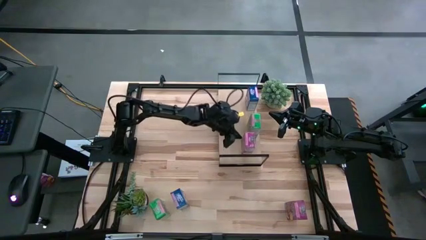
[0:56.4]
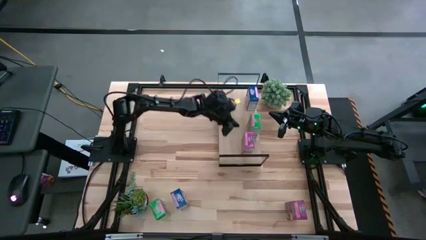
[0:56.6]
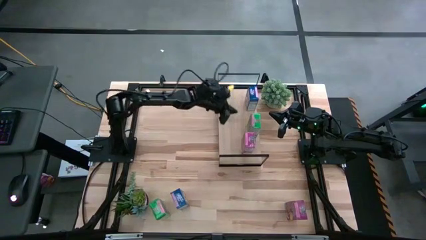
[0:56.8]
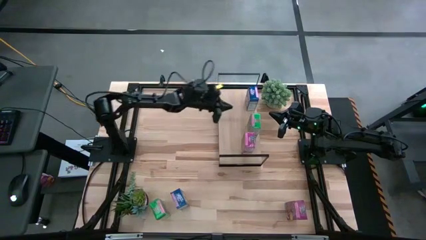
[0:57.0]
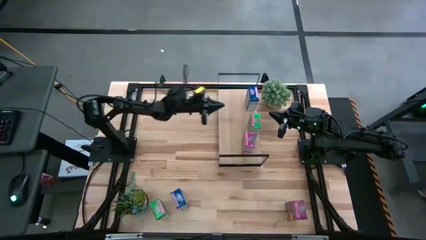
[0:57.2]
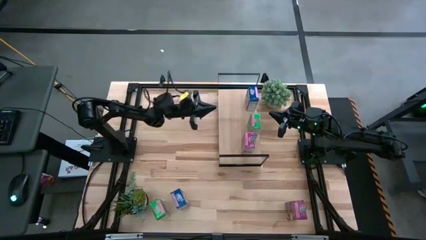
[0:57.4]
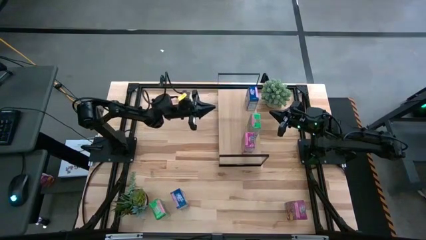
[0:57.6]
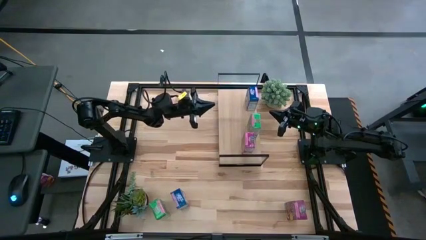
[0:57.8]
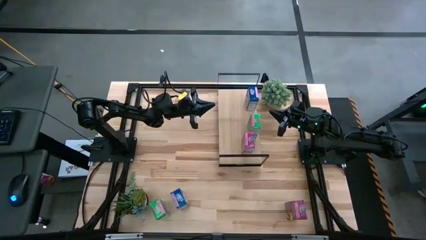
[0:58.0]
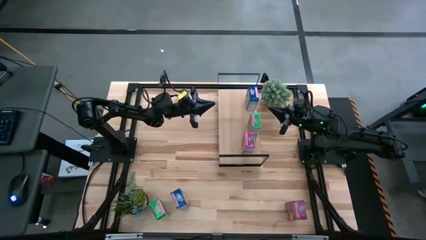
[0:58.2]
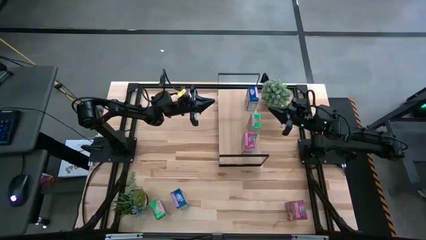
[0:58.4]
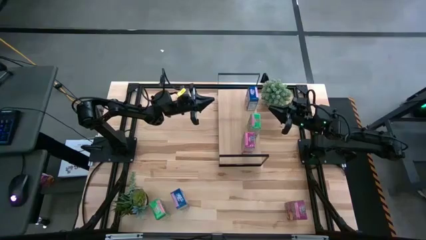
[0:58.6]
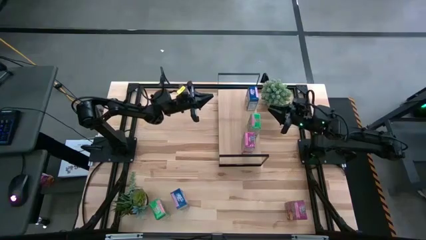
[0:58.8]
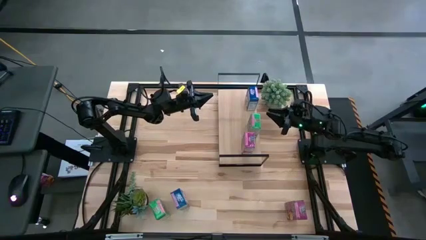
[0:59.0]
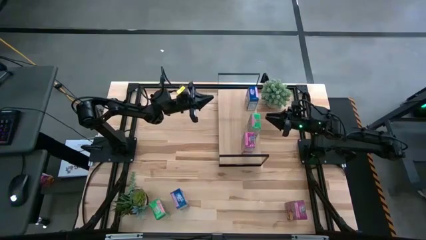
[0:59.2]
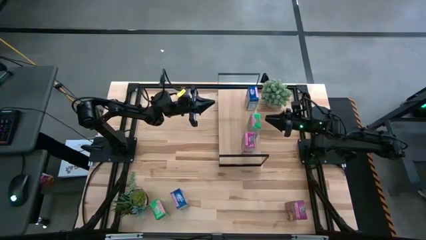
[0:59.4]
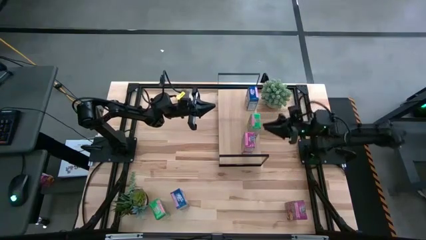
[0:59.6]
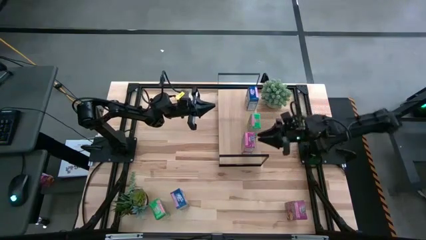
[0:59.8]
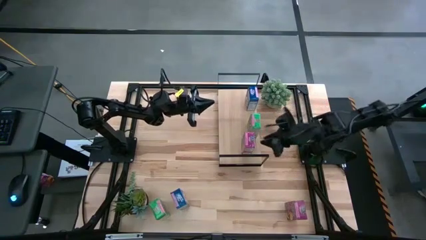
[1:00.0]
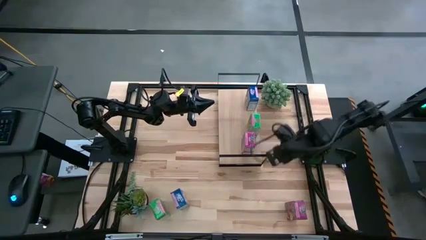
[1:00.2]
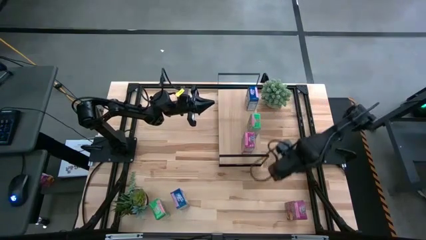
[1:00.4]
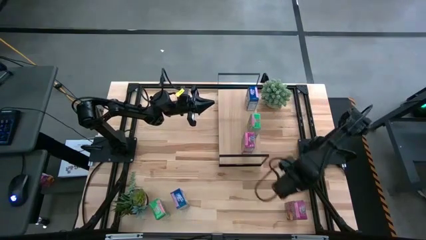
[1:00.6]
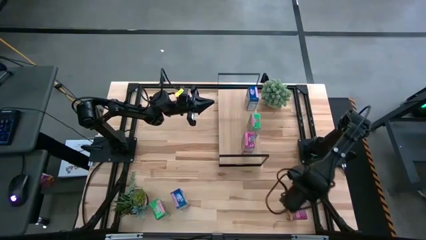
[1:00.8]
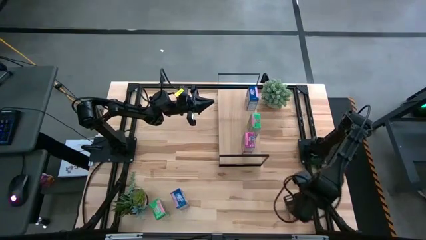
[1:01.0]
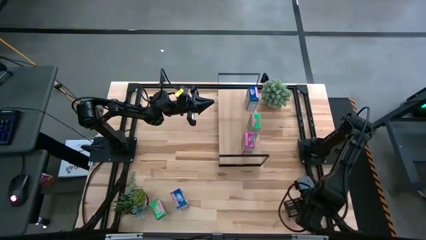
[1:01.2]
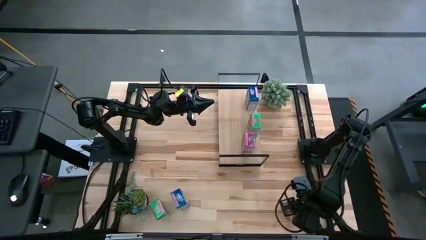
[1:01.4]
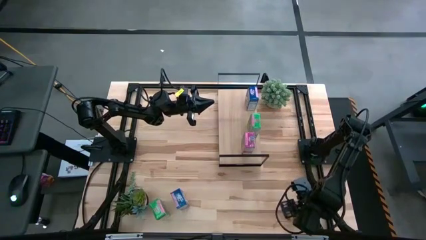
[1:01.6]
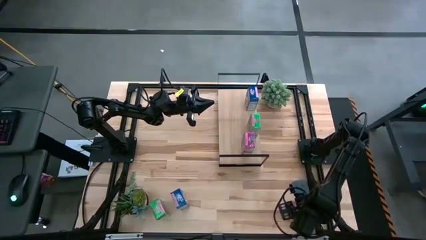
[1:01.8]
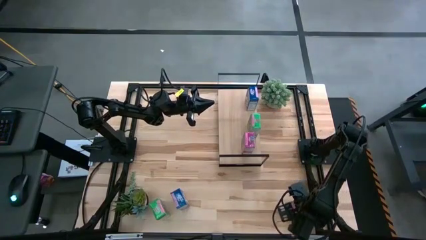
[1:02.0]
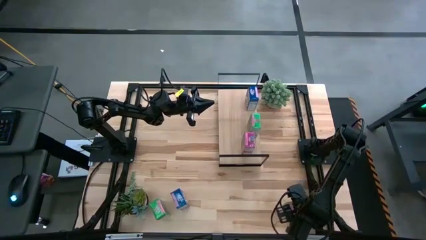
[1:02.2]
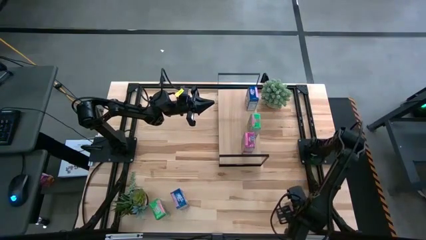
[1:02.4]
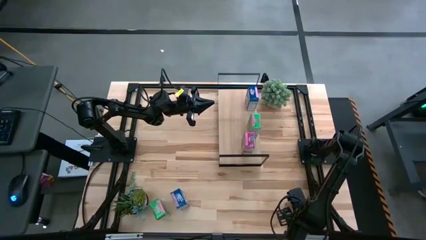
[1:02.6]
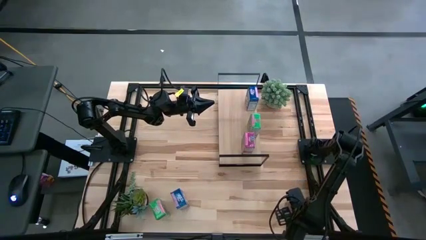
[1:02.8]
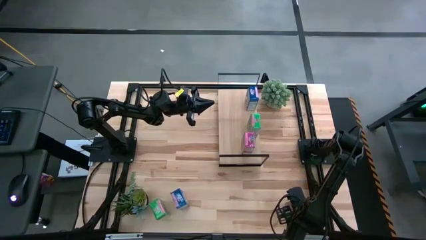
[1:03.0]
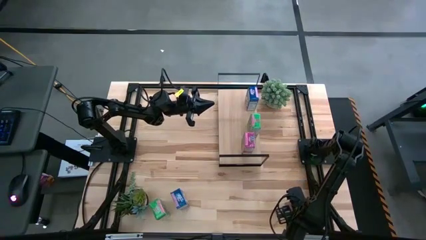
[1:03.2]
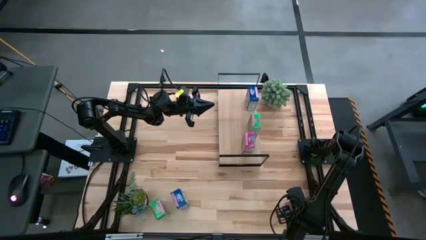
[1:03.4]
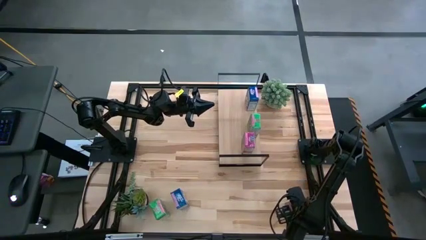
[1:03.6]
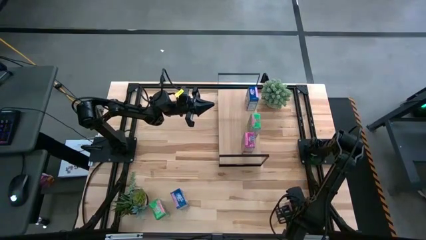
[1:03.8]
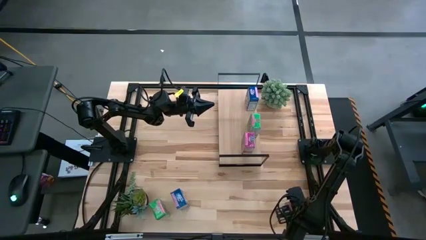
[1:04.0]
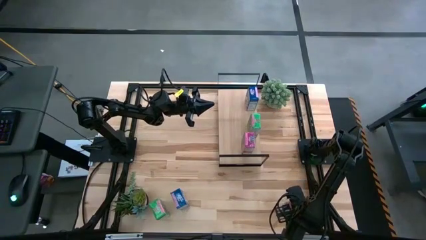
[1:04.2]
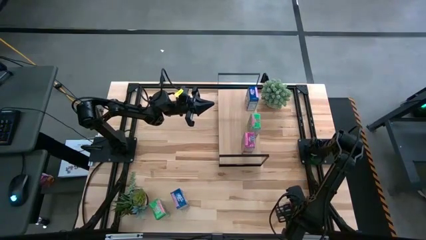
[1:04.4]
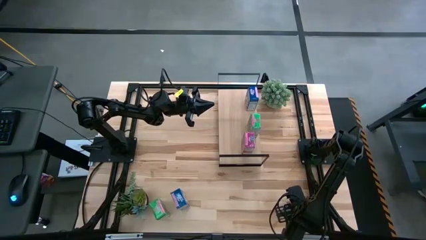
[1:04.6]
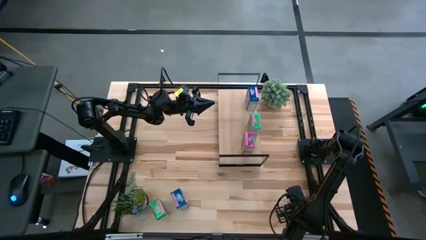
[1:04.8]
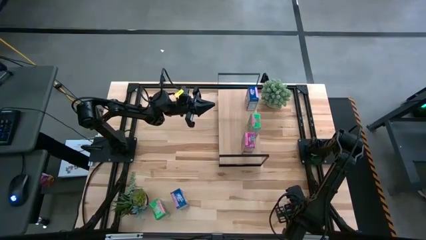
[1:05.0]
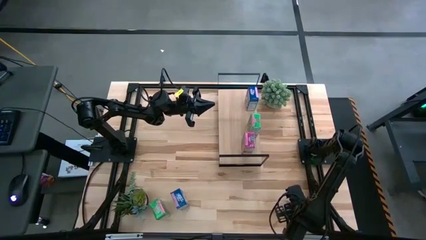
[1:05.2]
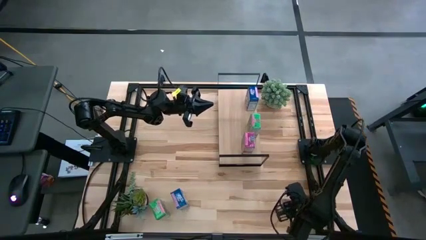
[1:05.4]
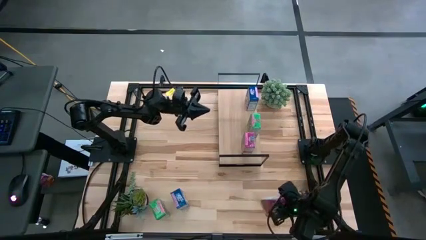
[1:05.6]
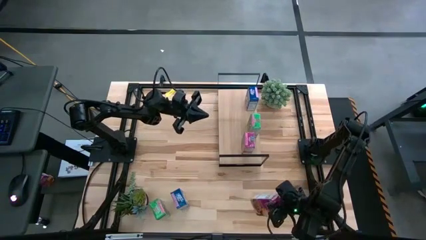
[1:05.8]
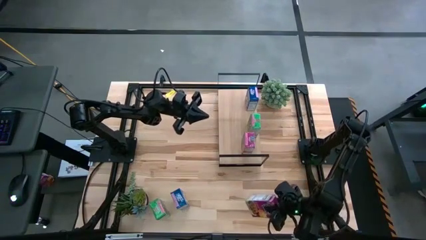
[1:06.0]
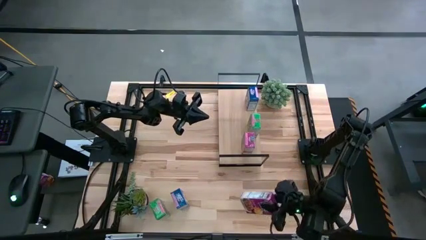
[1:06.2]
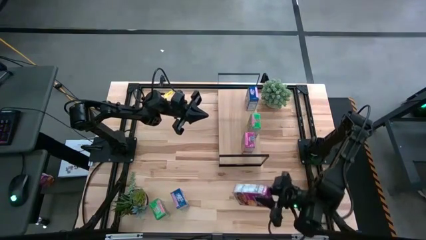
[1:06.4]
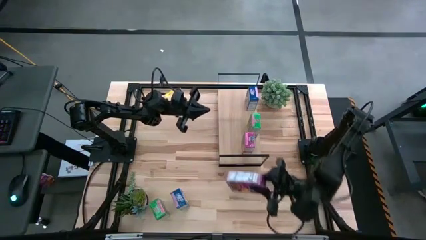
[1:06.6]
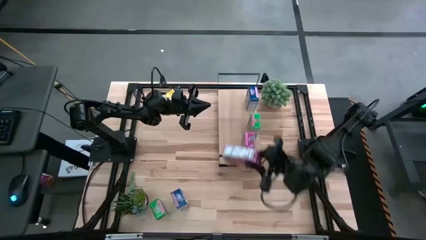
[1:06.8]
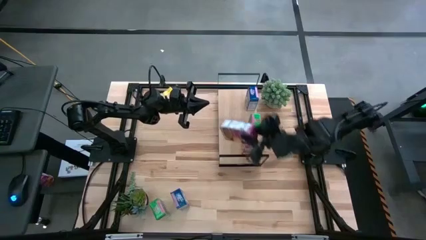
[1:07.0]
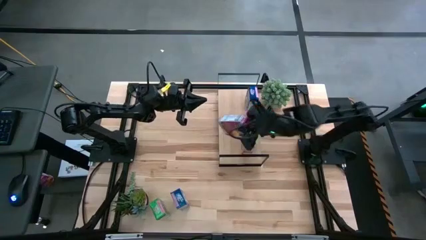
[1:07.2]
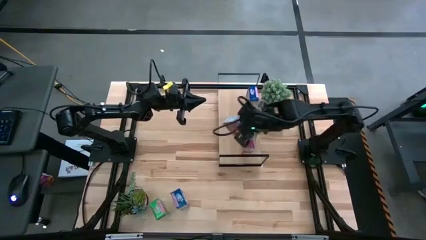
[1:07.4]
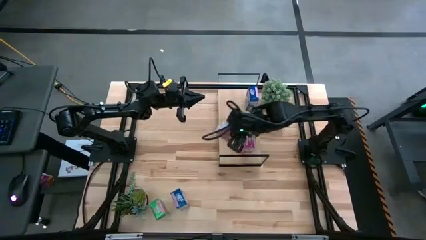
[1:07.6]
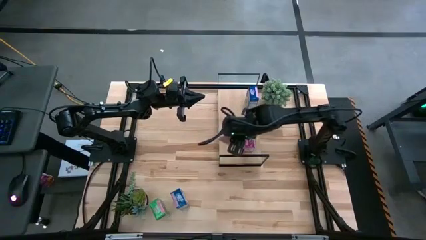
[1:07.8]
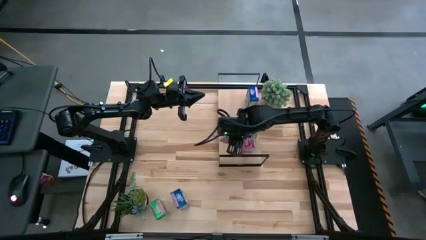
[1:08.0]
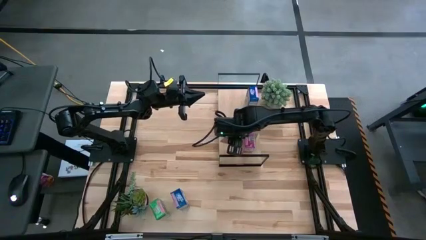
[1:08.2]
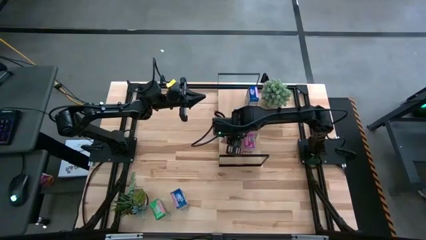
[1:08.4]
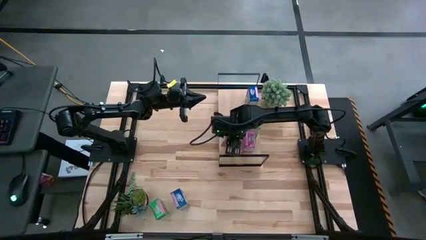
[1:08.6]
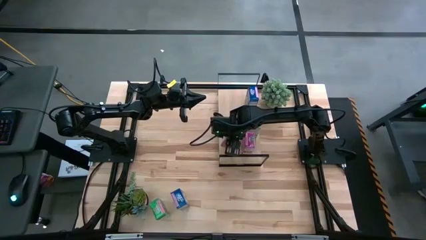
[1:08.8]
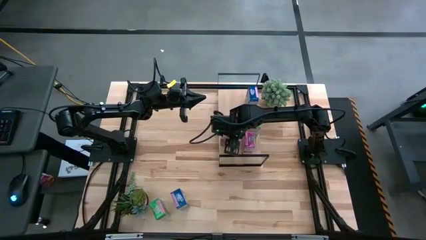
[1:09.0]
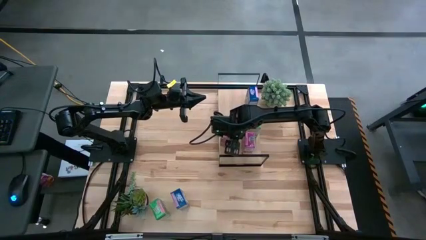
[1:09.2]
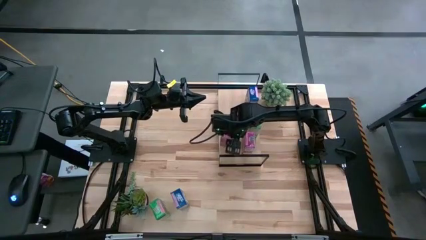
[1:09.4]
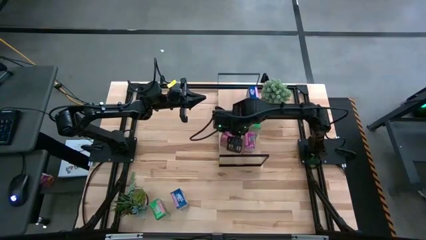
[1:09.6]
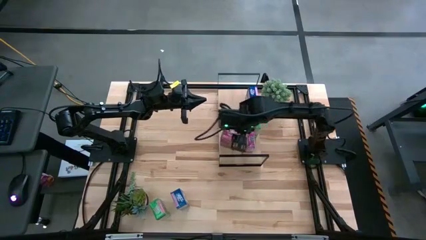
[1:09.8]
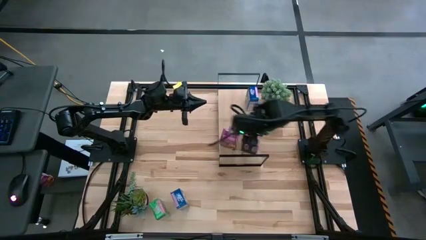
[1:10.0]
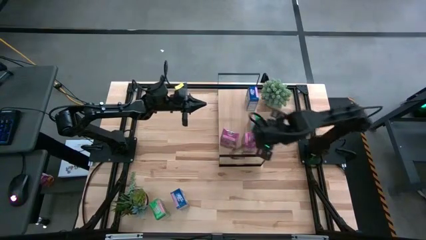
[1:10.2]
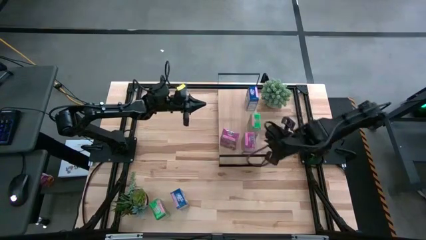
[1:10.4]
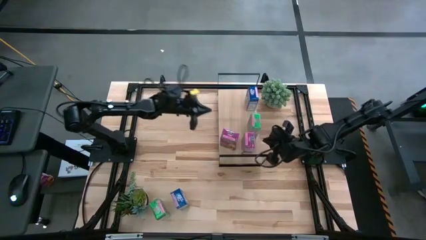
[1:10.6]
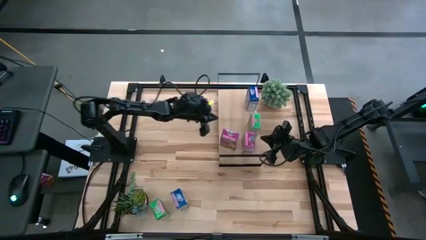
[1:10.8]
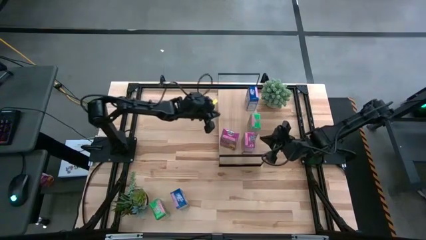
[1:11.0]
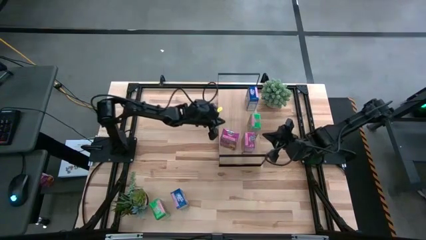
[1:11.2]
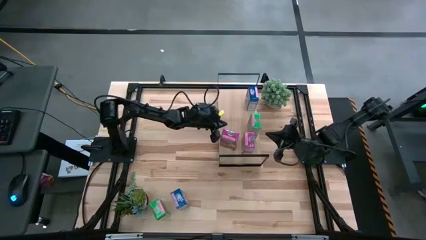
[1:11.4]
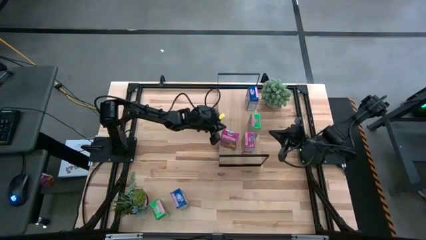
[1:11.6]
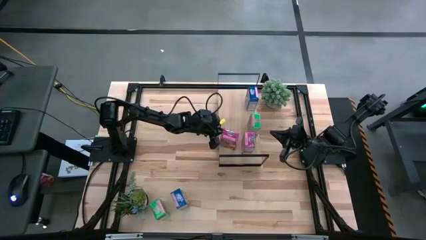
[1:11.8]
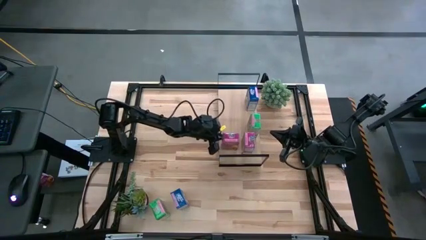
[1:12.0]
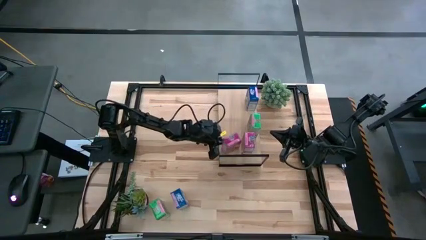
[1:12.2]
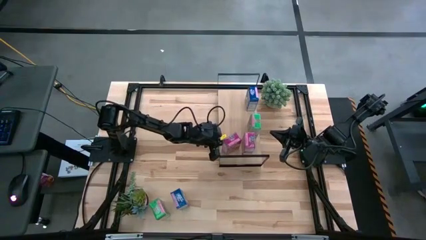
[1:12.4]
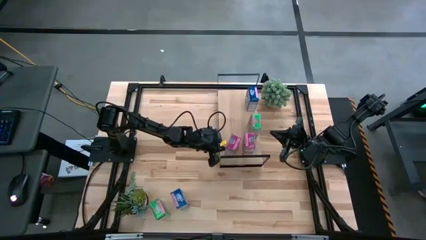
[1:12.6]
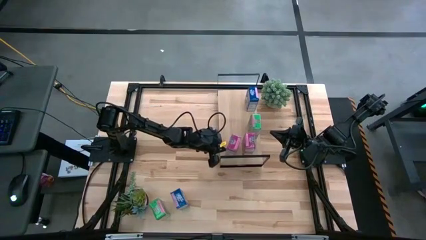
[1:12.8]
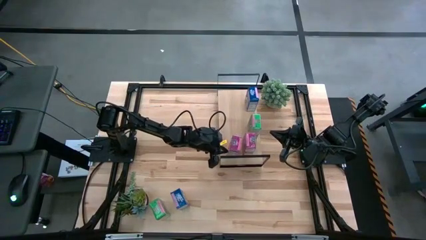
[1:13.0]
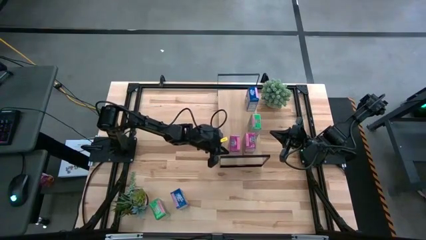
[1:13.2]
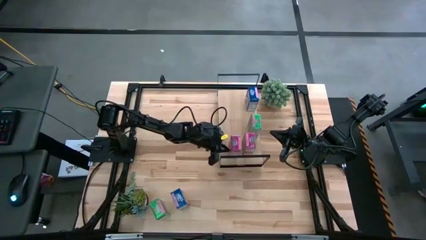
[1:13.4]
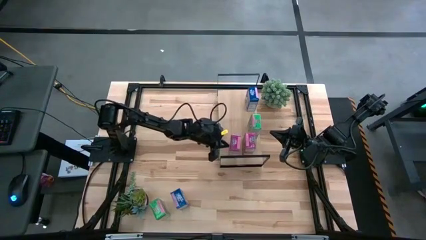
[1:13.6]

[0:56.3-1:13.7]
Task: Stack cereal on shelf
Put the violet cereal box on the shelf aligned with the other violet cereal box
